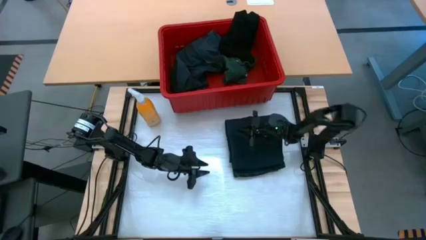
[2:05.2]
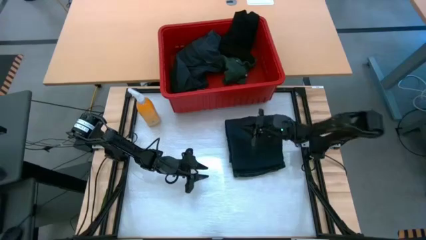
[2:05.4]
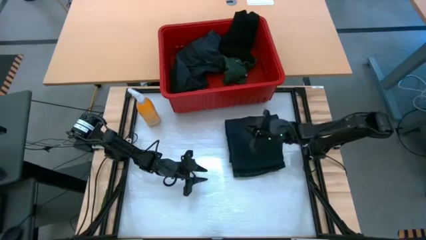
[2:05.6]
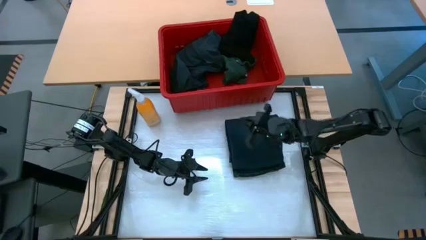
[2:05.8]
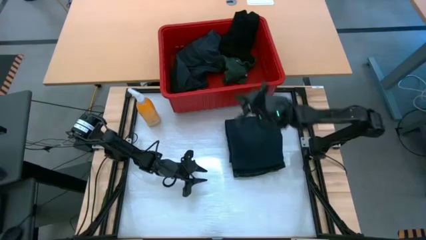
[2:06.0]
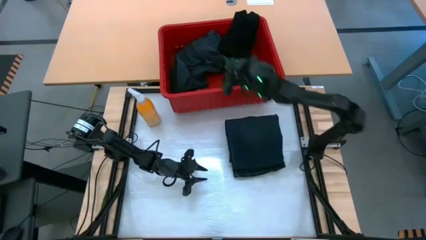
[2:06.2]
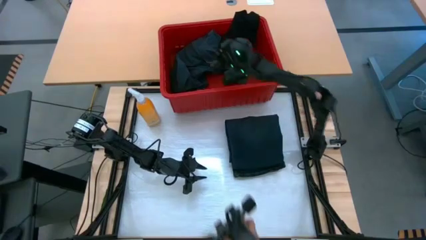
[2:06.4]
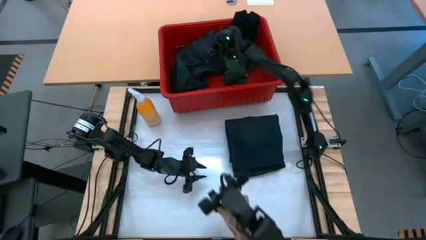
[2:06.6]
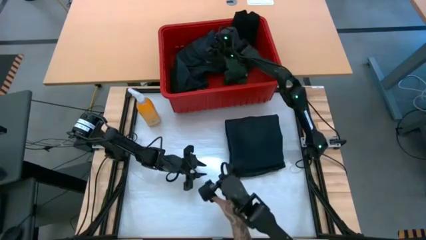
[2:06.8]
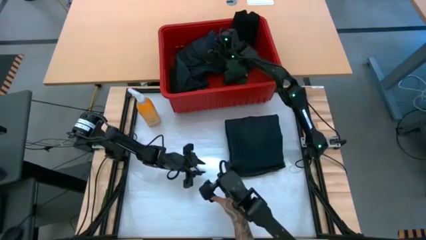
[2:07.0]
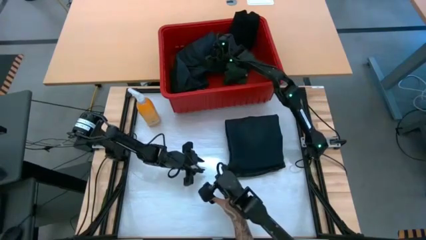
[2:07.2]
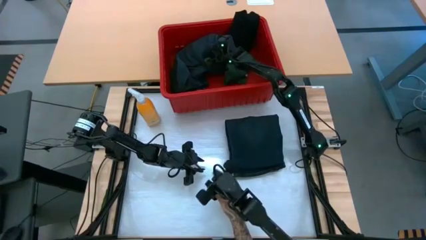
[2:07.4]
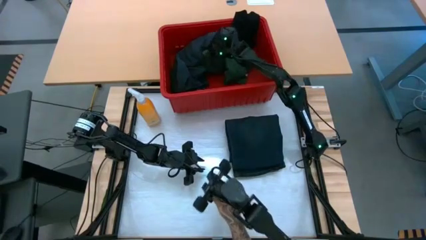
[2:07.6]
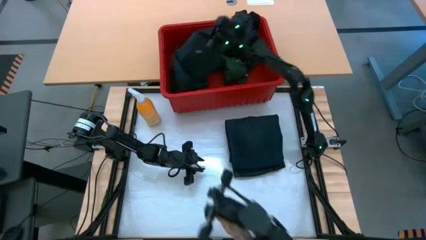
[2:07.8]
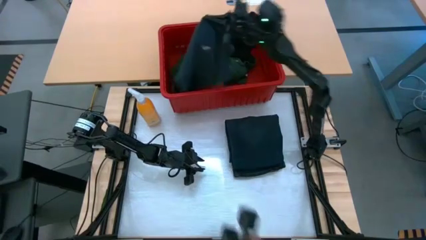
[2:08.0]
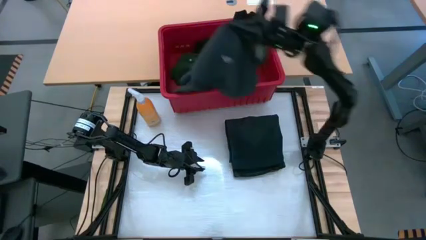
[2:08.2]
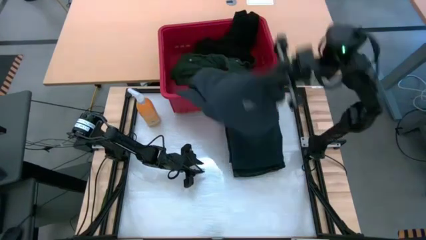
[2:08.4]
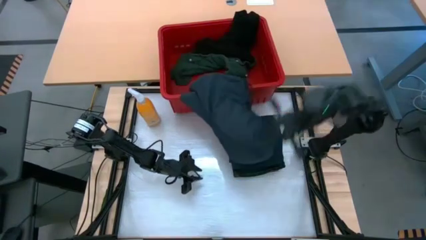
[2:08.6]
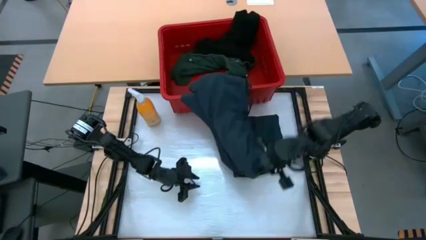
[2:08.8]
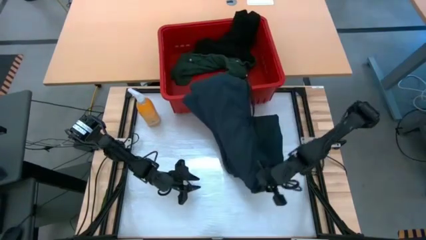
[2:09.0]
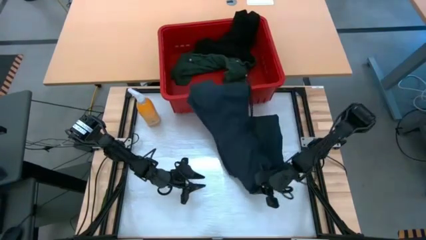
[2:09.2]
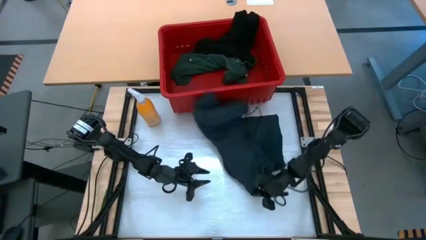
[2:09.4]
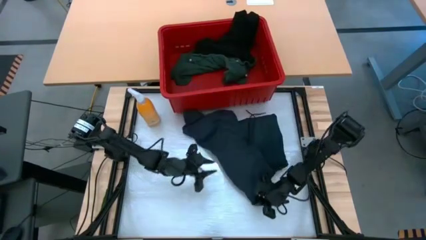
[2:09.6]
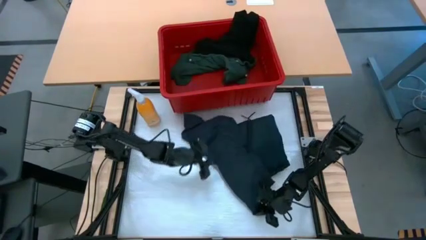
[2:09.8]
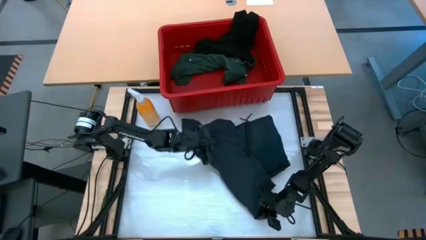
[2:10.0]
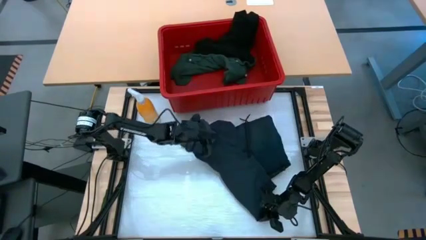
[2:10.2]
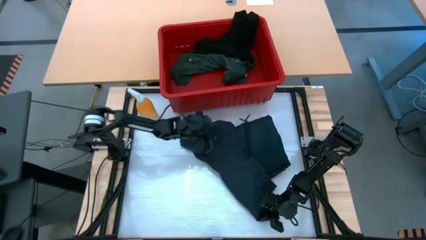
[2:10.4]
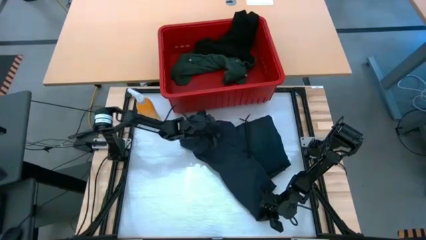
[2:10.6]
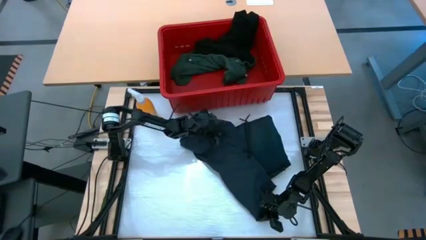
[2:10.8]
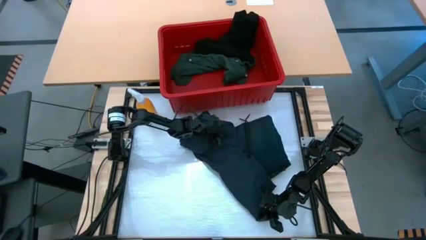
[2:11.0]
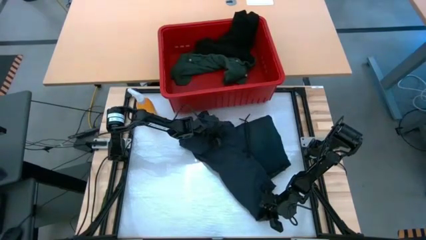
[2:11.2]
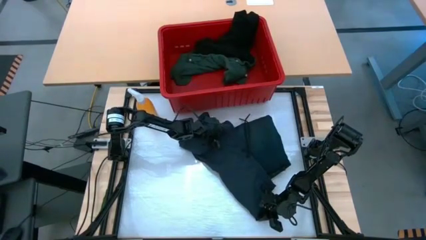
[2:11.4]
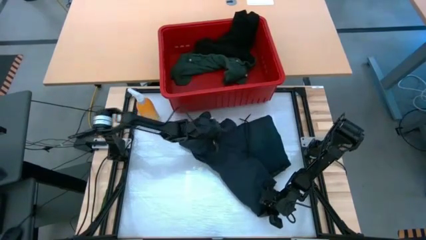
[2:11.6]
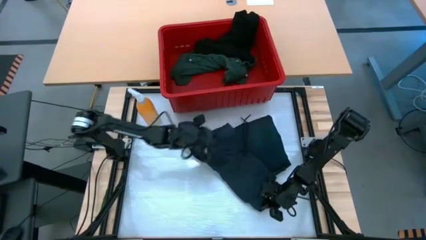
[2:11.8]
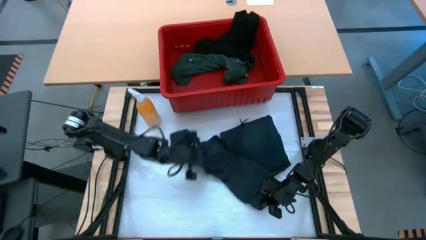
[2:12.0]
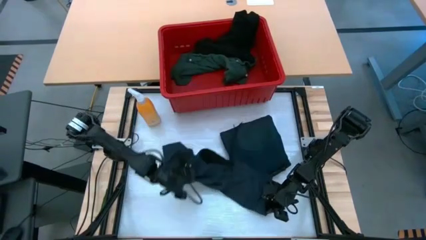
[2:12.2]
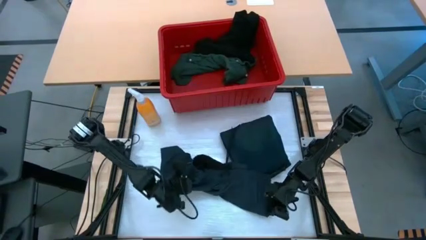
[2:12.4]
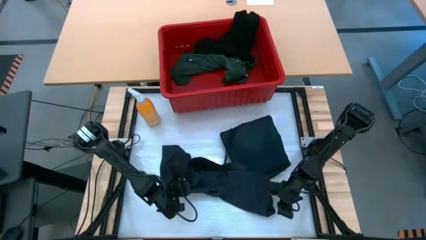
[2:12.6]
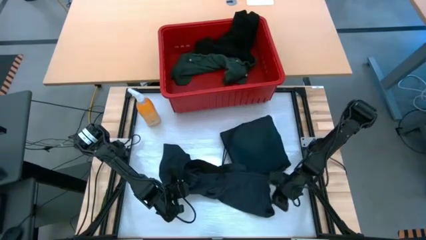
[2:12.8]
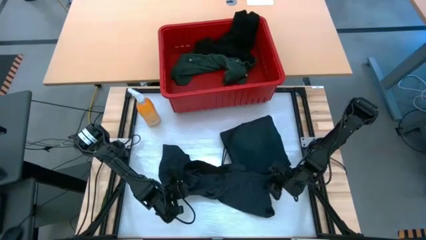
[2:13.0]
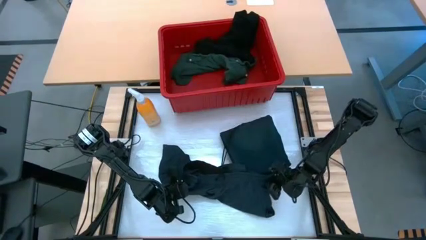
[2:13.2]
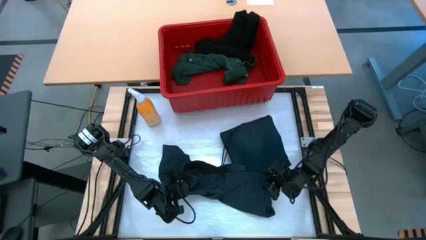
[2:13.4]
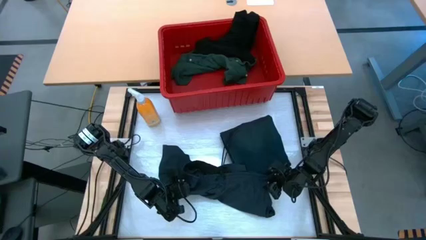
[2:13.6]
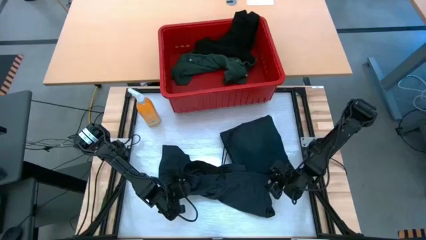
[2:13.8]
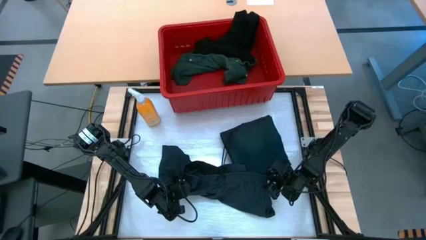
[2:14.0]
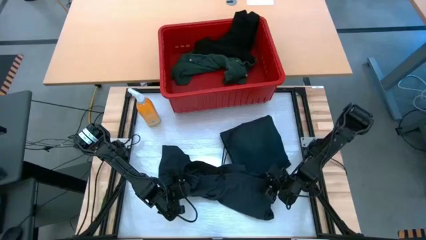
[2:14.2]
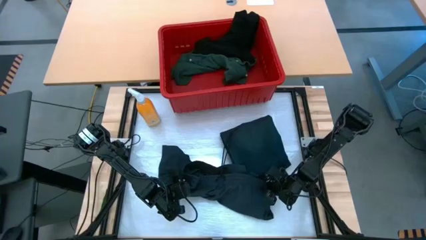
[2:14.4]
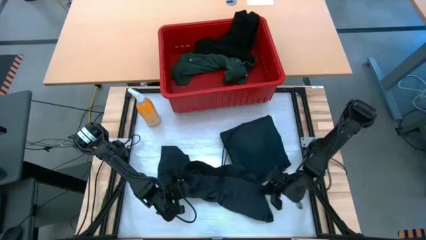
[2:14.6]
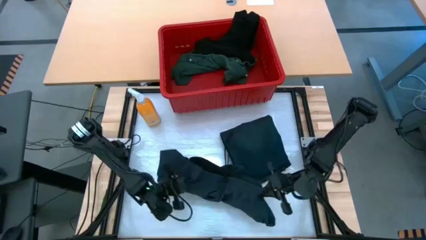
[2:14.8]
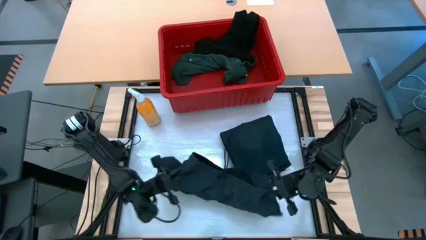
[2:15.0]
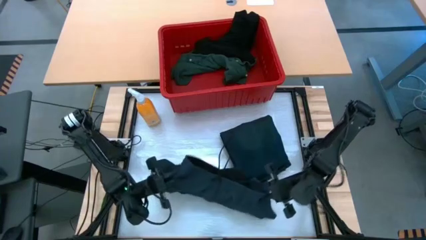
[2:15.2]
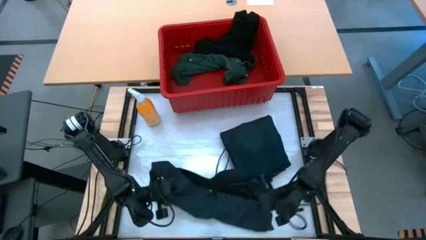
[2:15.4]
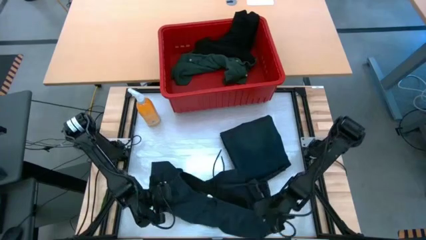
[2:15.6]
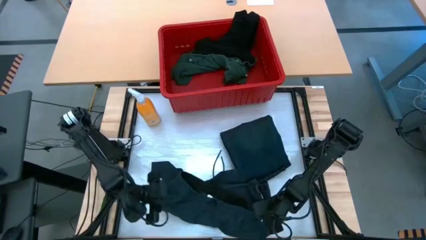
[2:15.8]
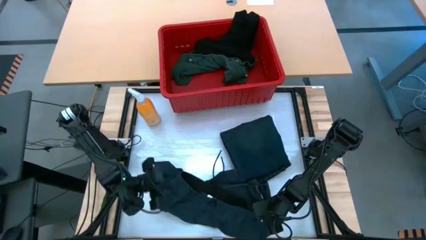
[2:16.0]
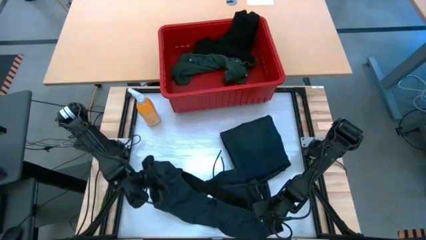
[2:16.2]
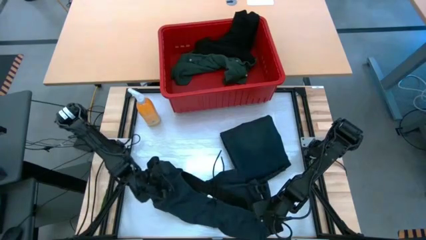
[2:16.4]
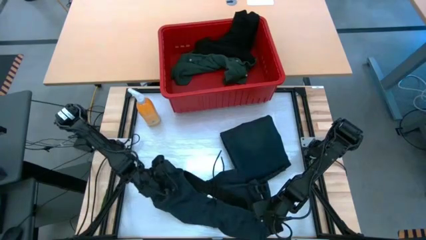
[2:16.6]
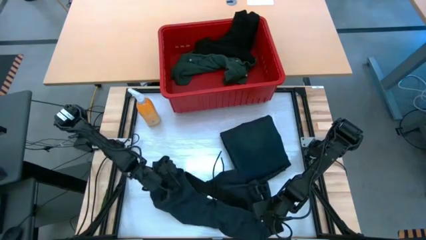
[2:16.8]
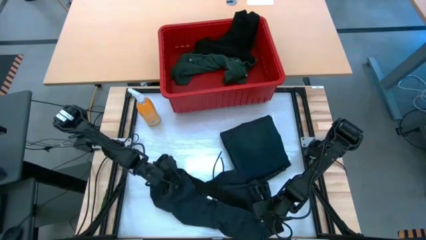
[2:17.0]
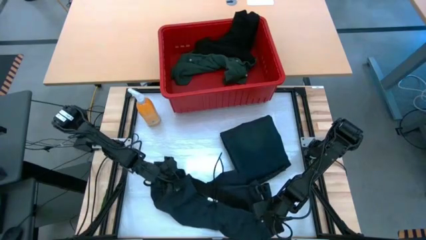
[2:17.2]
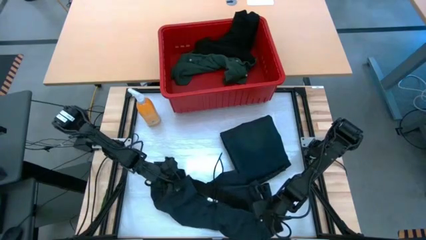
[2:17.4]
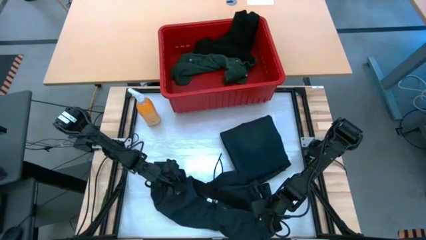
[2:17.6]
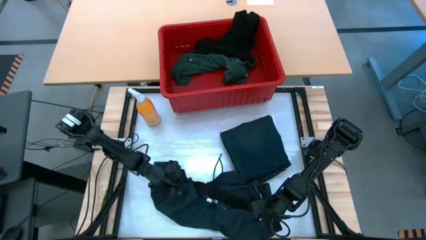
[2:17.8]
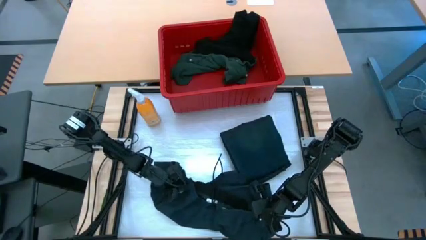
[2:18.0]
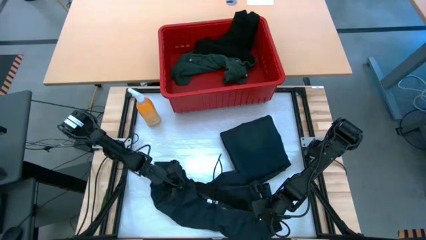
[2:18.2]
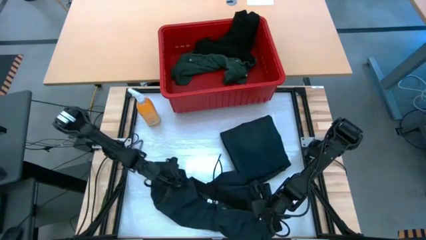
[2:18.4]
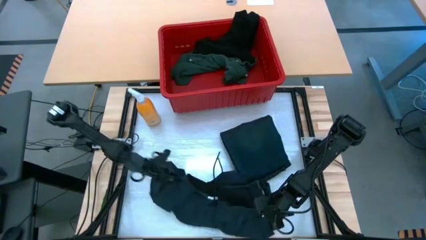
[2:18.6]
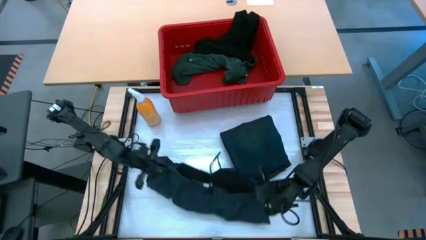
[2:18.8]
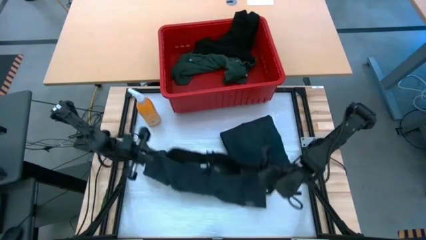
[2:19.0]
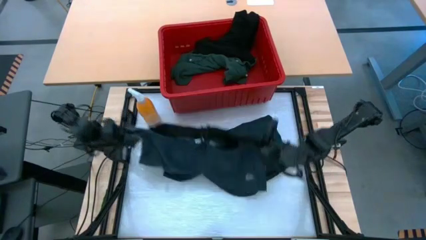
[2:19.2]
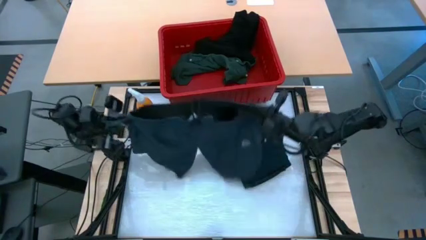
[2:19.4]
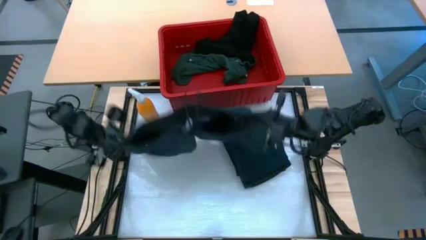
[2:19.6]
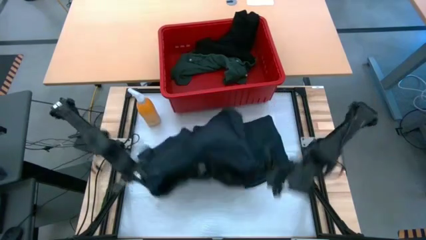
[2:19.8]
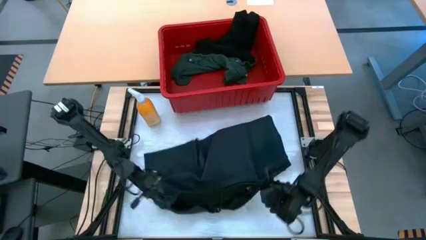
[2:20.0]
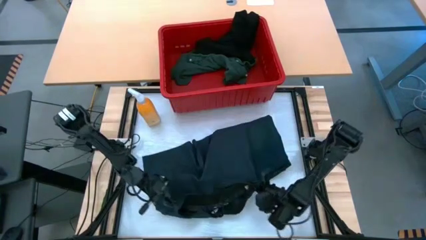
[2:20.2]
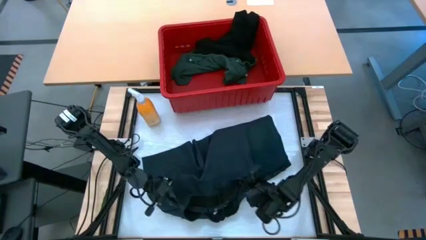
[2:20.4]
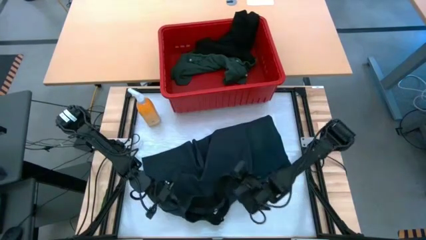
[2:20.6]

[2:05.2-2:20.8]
Task: Fold Laundry from Bin
Fold the dark blue shorts
